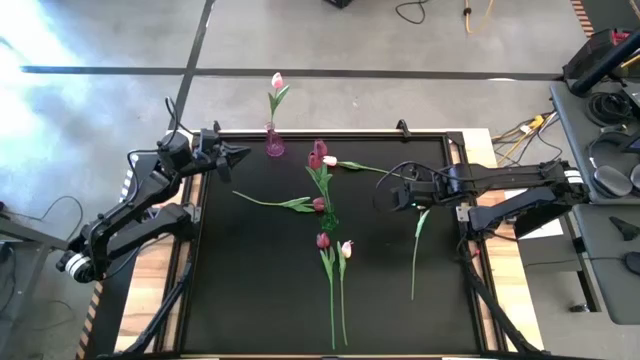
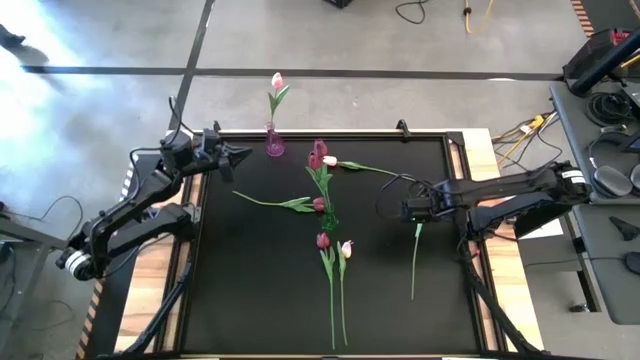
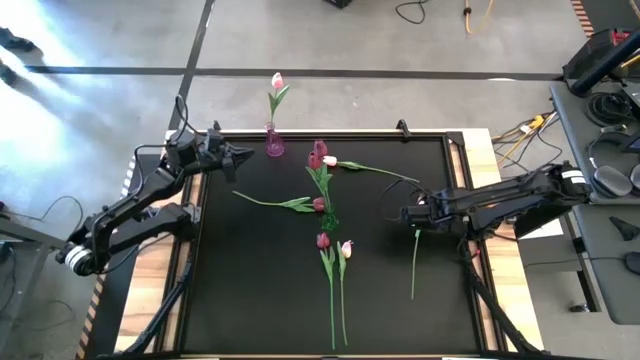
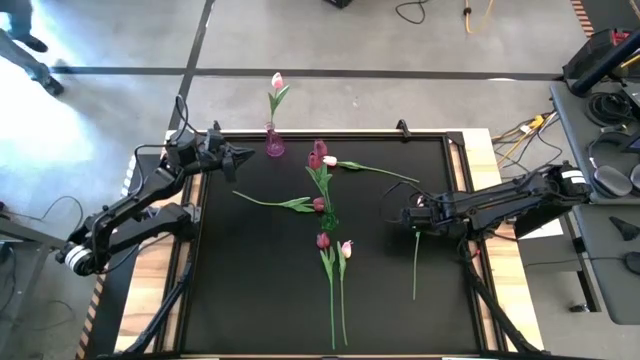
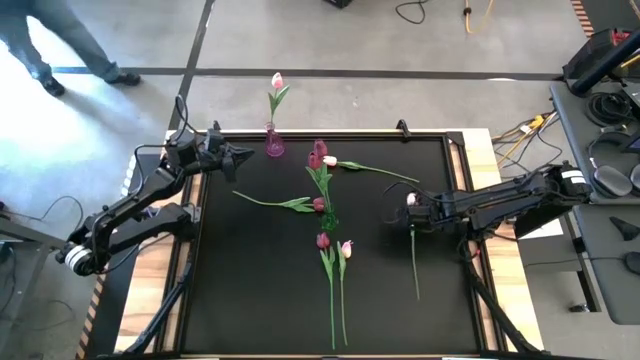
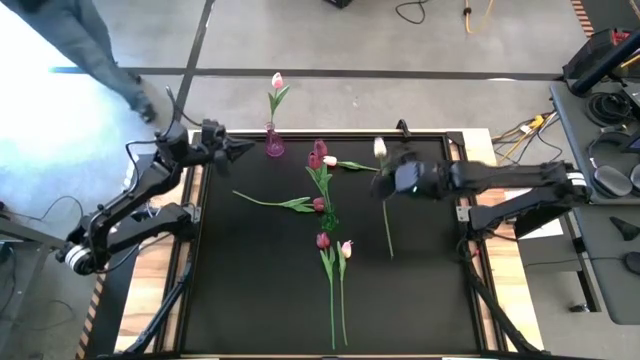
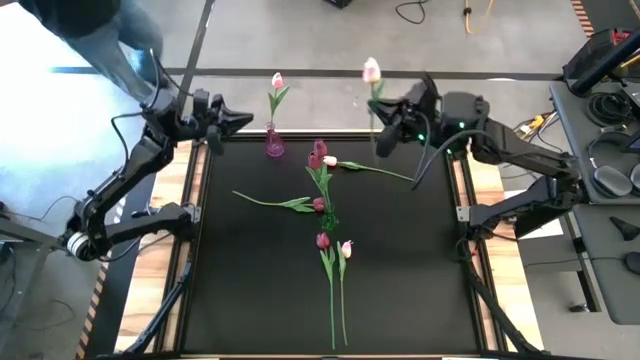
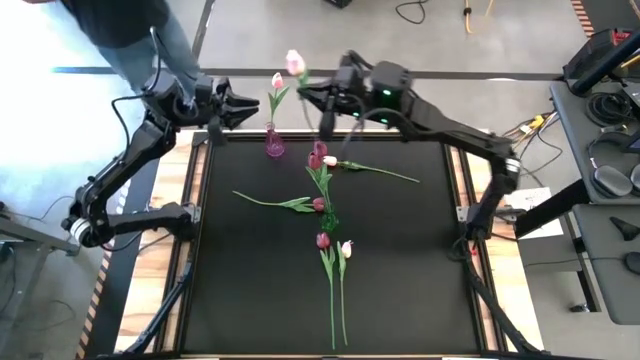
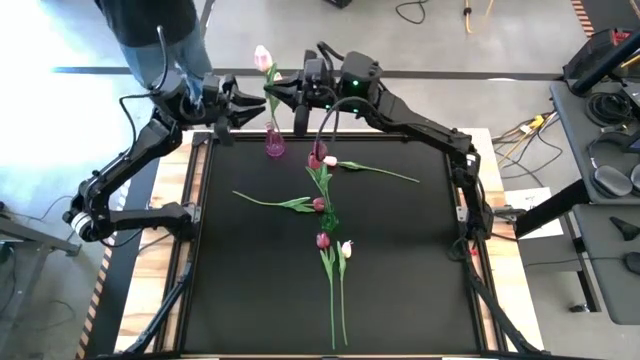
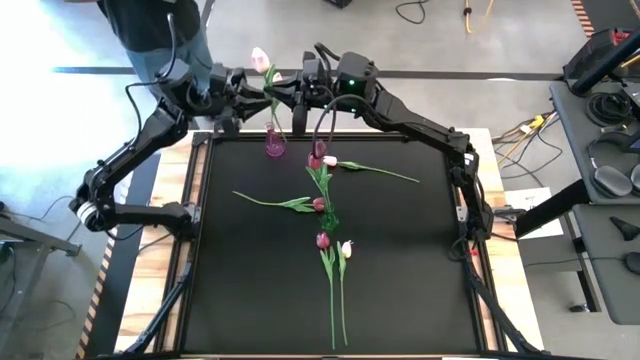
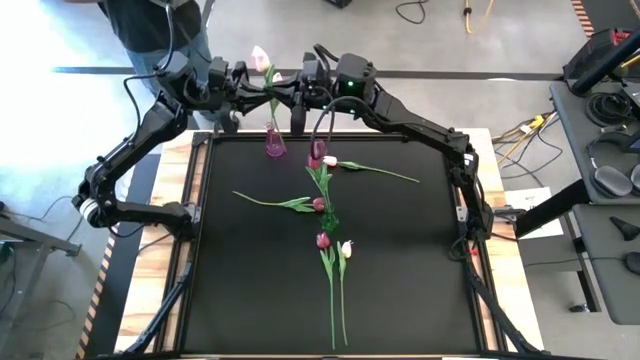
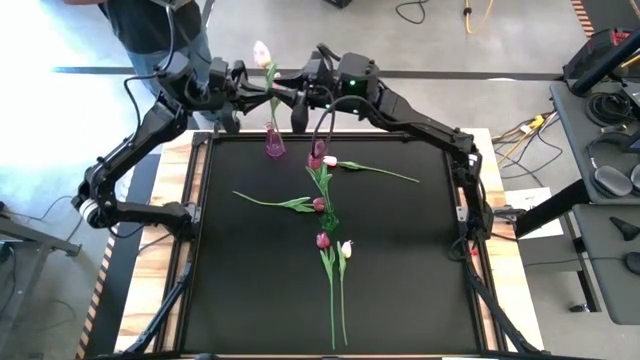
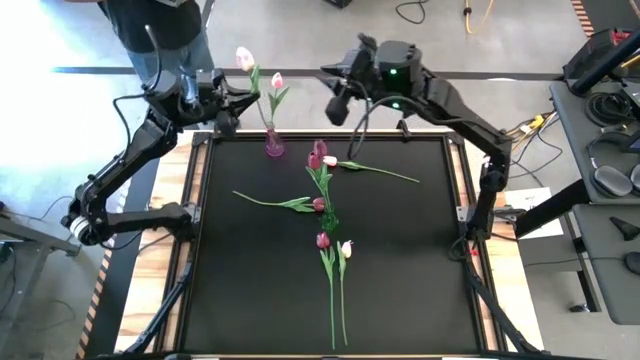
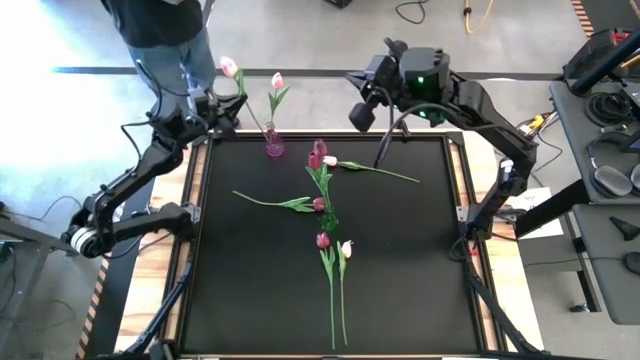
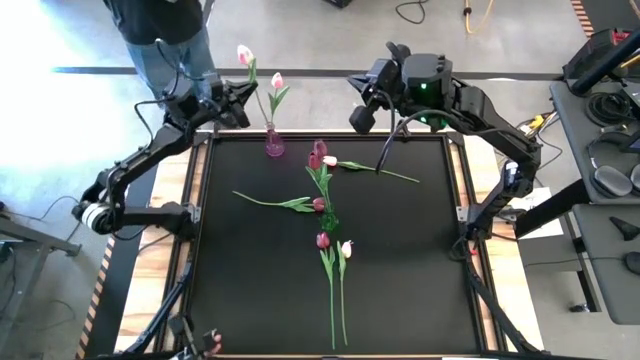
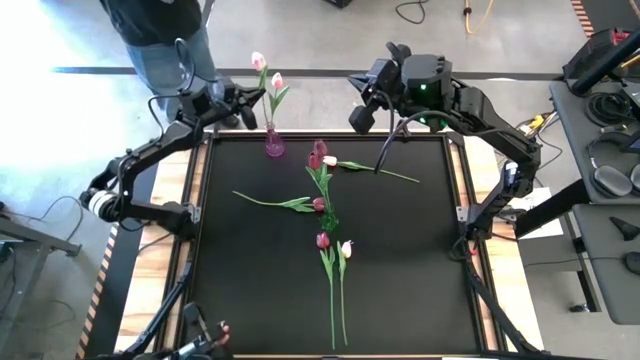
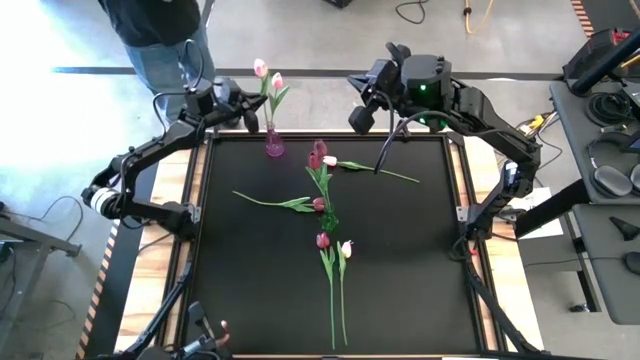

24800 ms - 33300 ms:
Task: Sort flowers into vase by color
Put the pink flower into the violet vase

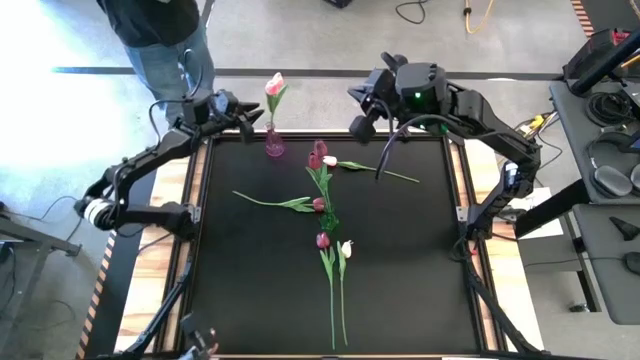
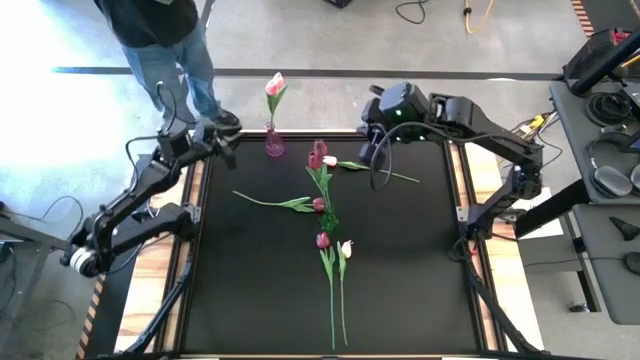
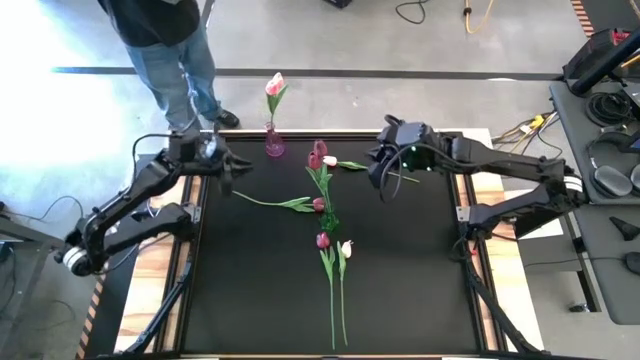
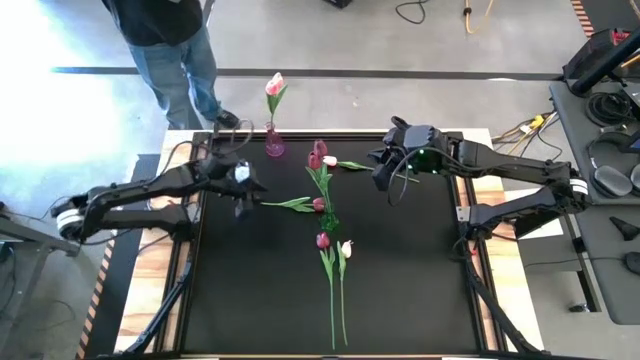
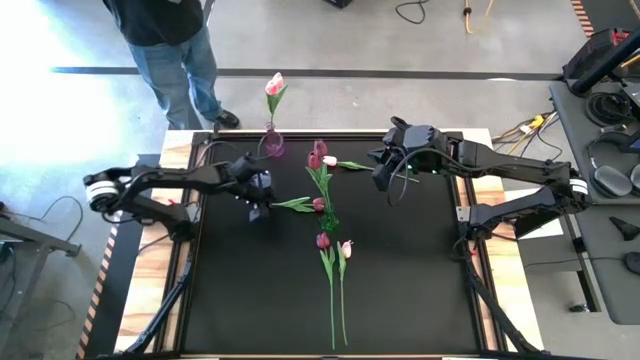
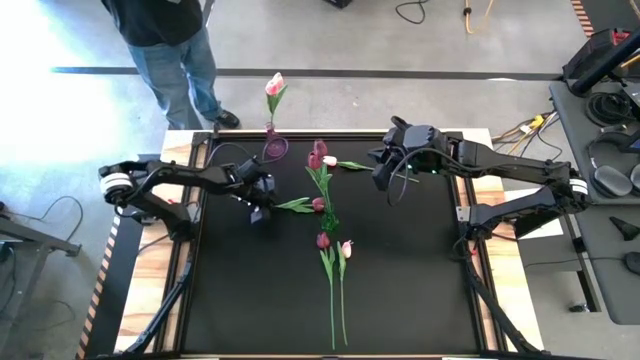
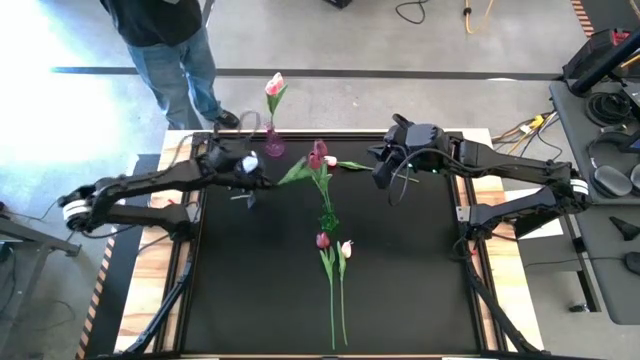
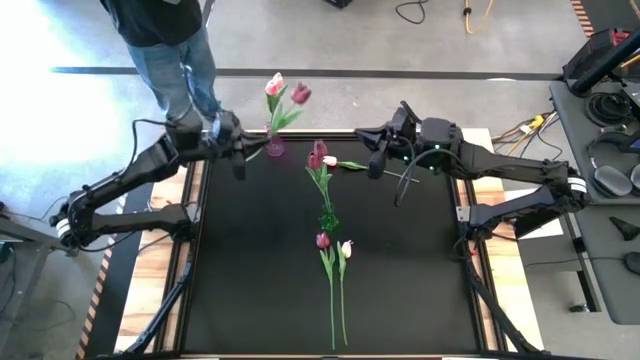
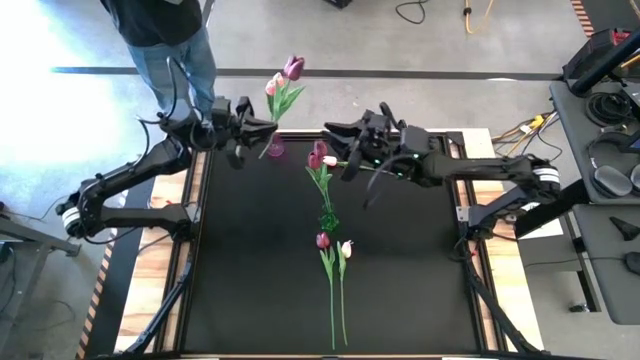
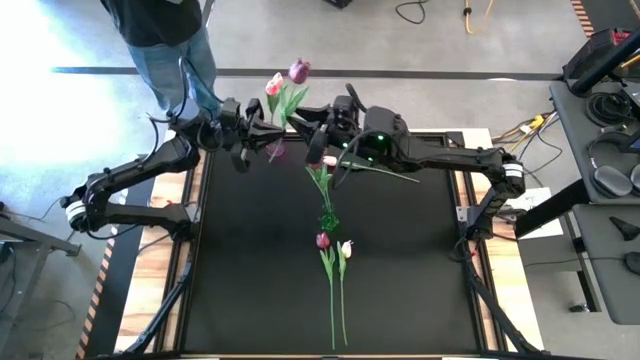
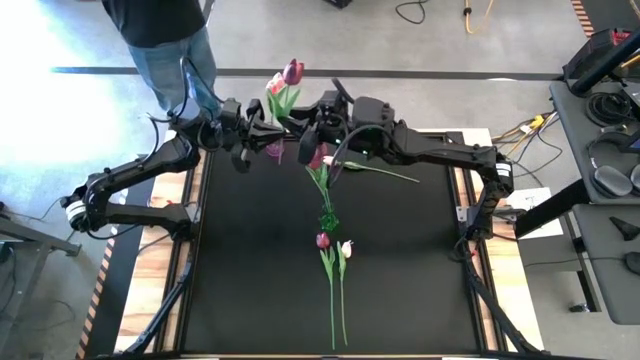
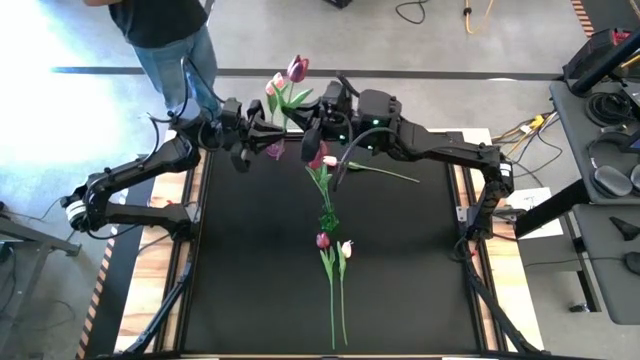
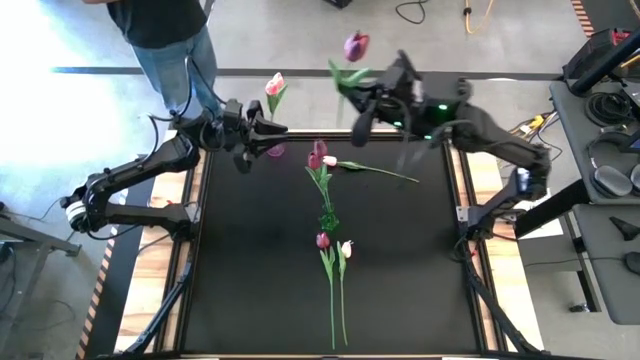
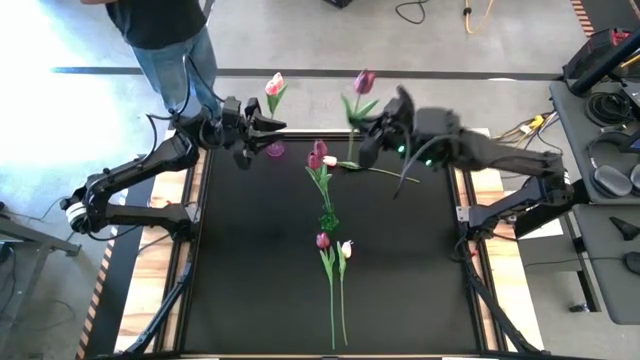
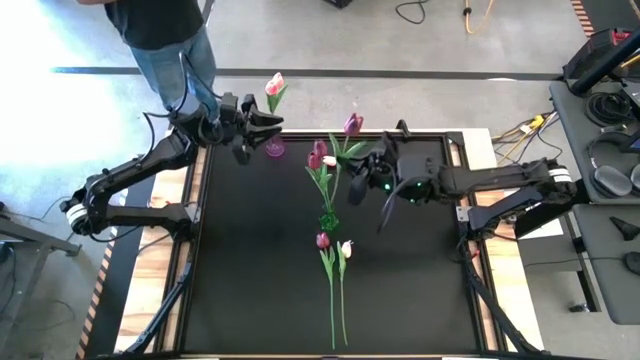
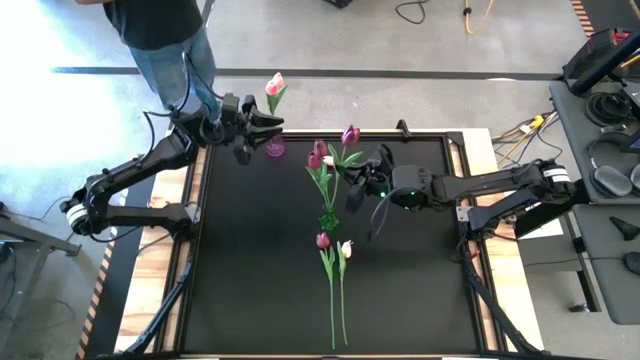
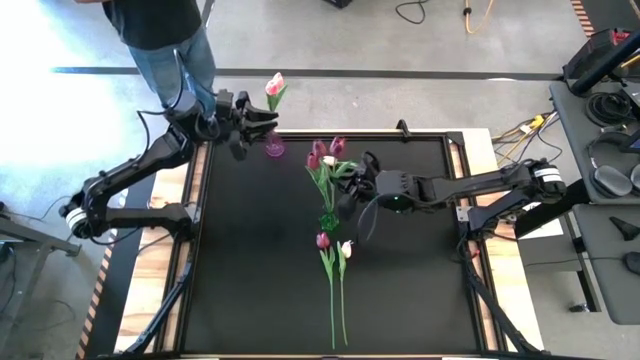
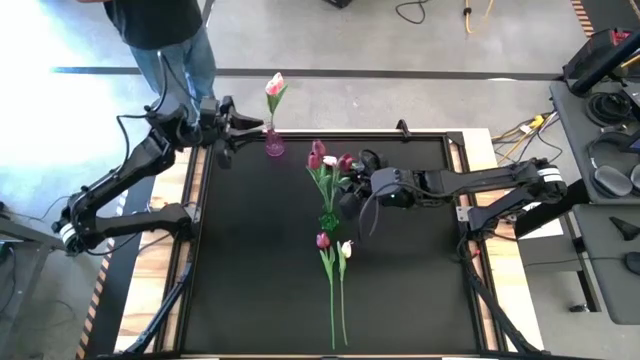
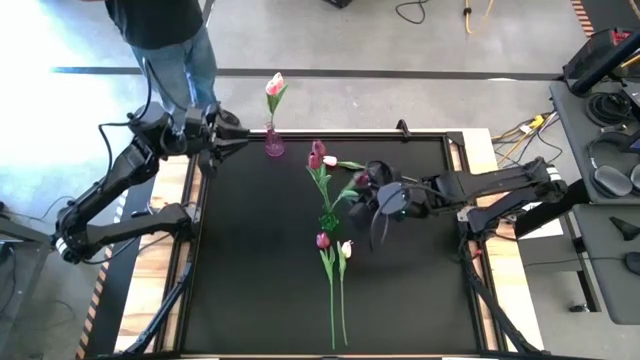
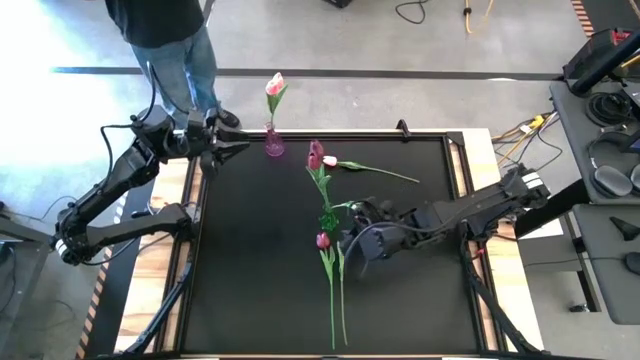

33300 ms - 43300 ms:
Put the red flower into the green vase

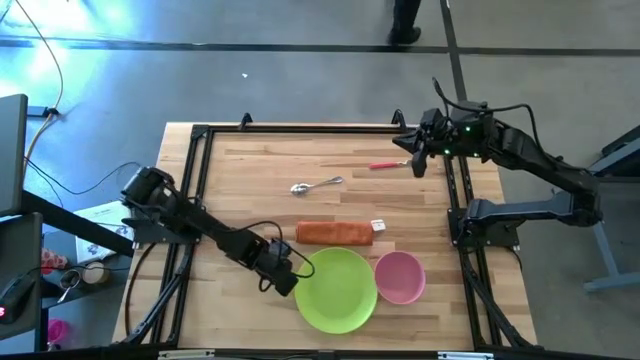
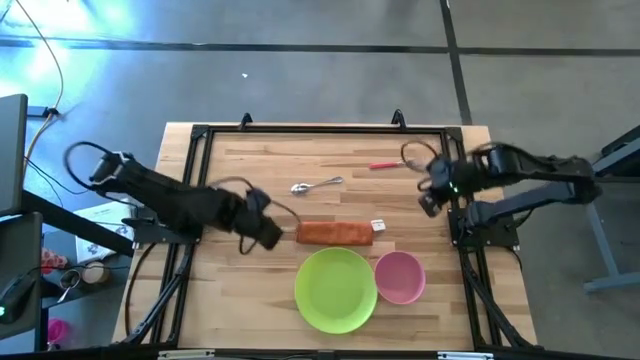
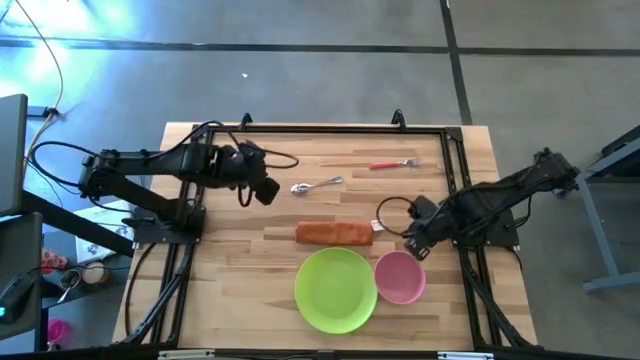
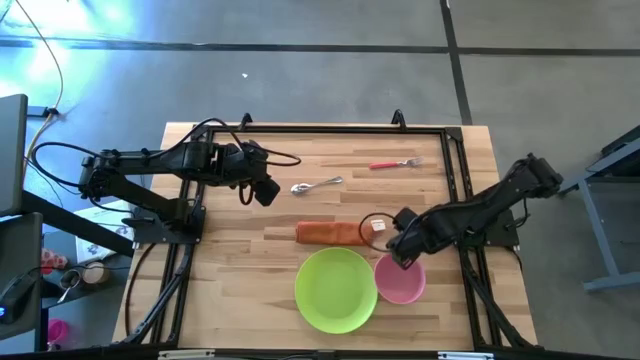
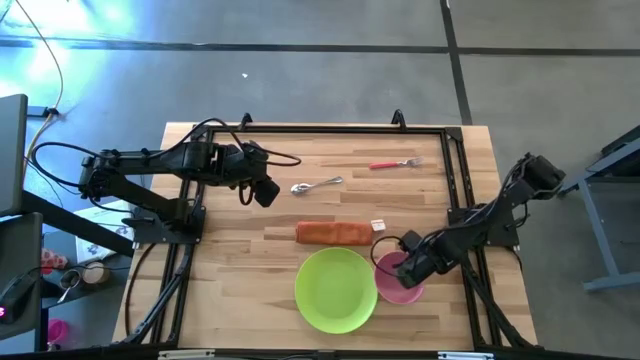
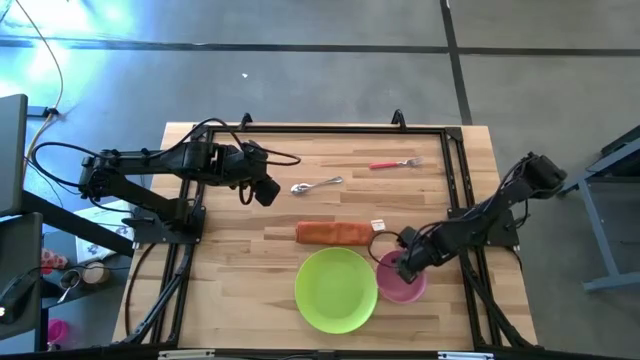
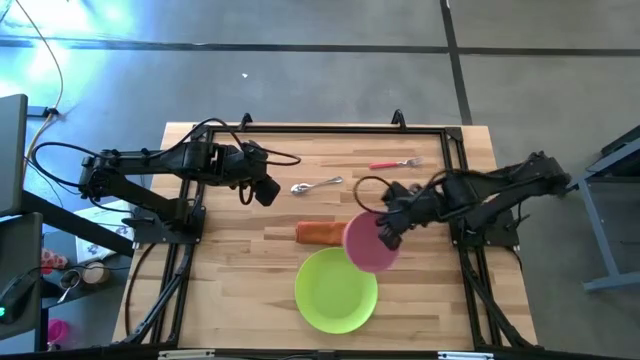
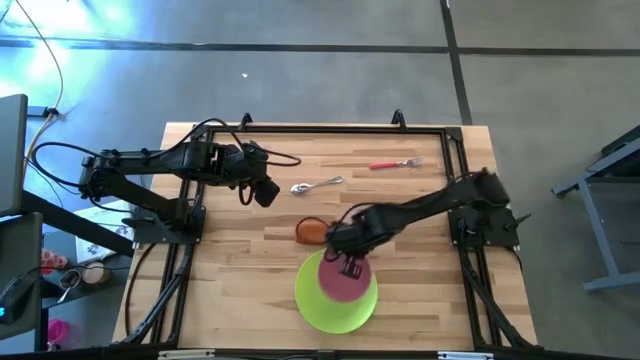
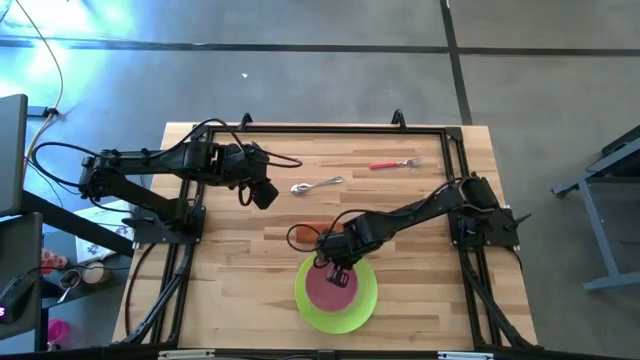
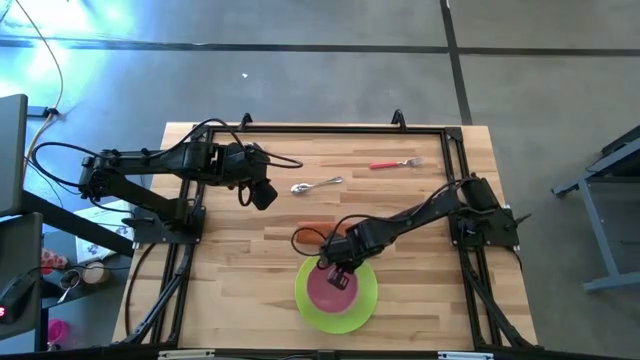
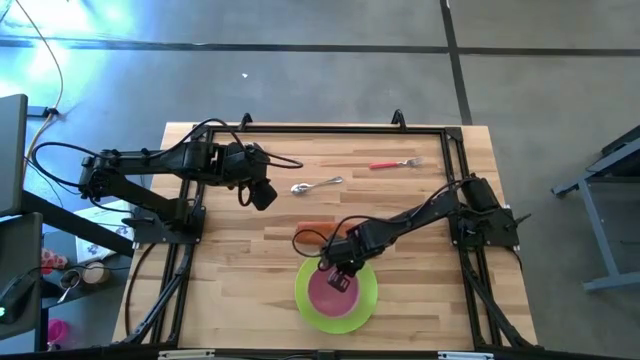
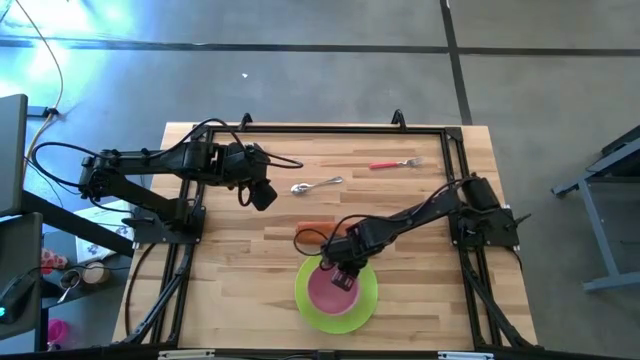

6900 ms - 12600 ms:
Task: Set table place
Put the pink bowl on the green plate
